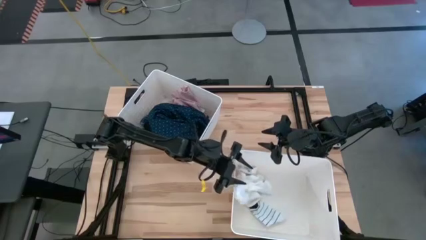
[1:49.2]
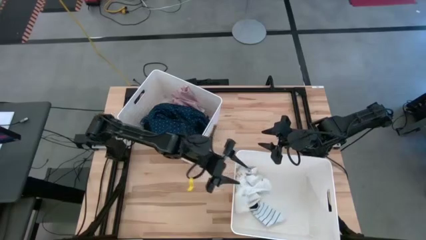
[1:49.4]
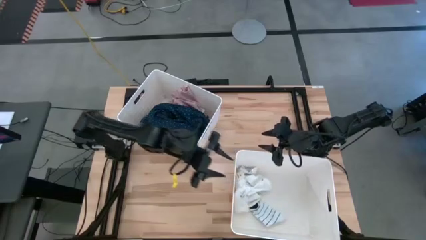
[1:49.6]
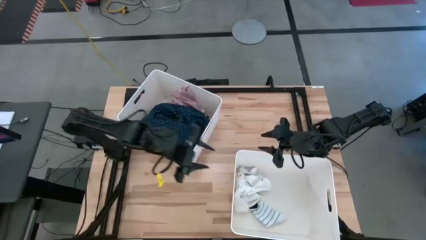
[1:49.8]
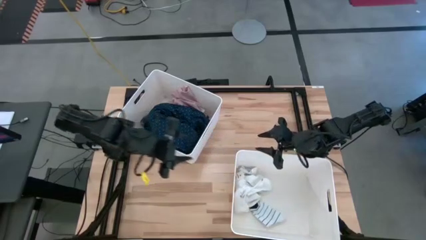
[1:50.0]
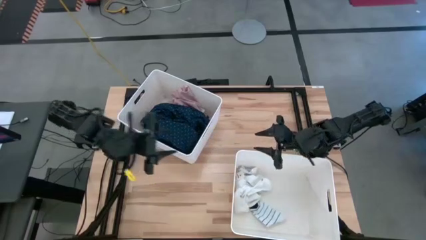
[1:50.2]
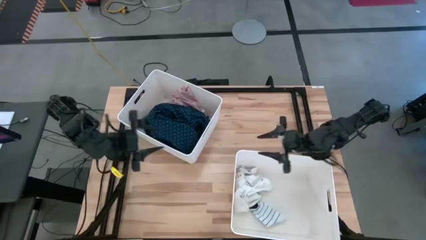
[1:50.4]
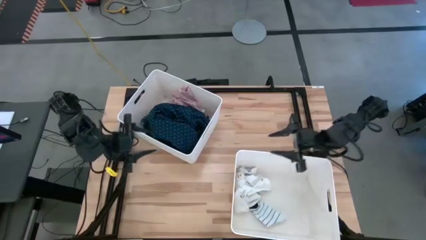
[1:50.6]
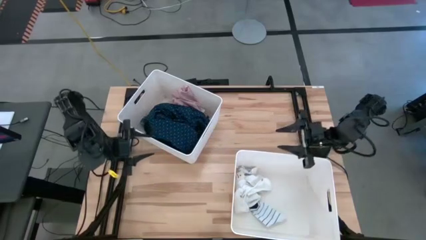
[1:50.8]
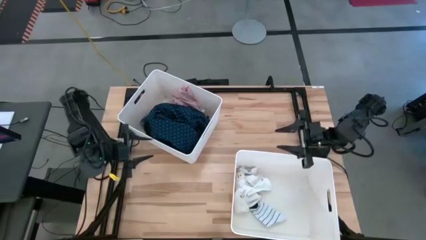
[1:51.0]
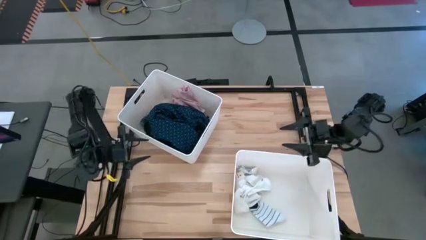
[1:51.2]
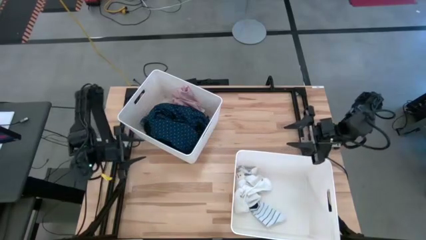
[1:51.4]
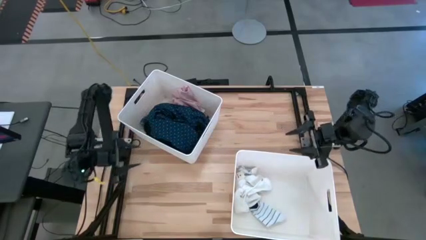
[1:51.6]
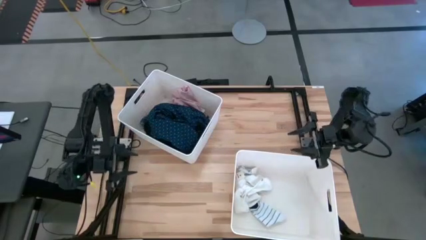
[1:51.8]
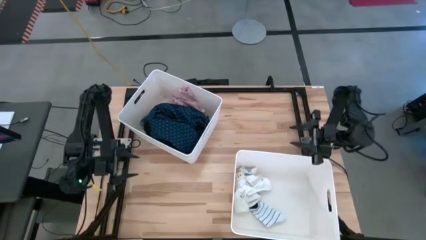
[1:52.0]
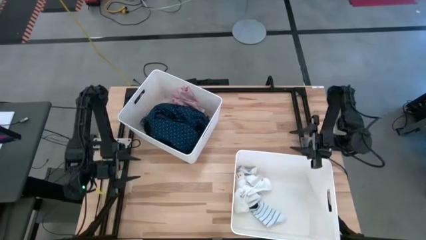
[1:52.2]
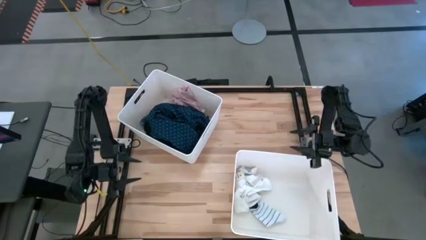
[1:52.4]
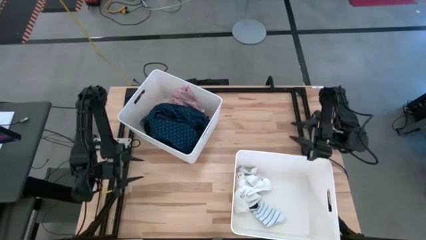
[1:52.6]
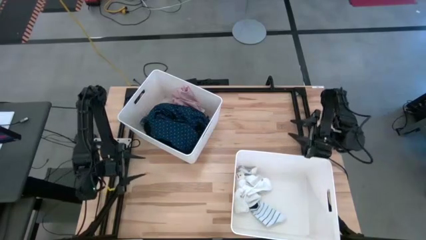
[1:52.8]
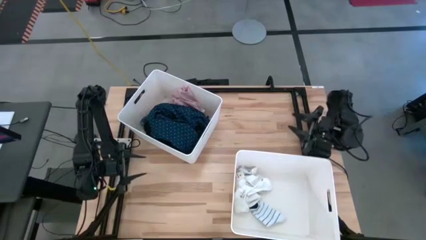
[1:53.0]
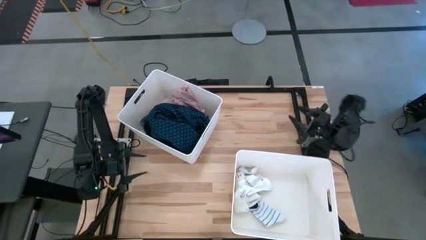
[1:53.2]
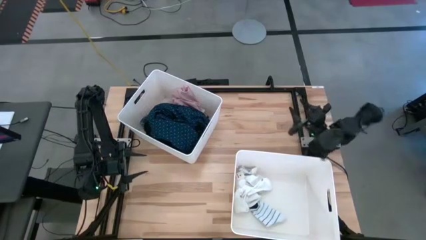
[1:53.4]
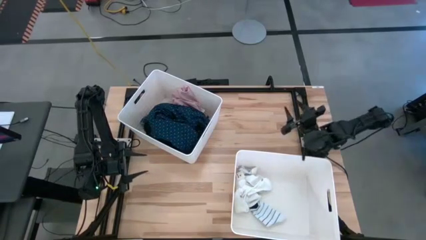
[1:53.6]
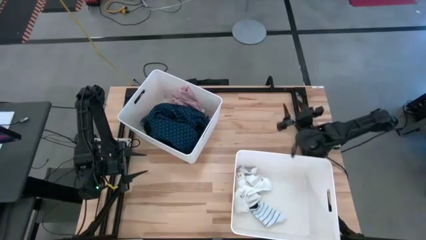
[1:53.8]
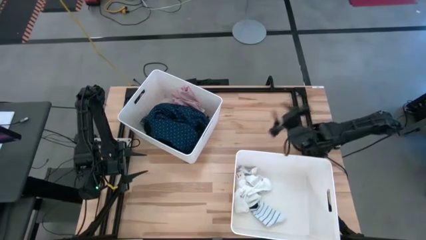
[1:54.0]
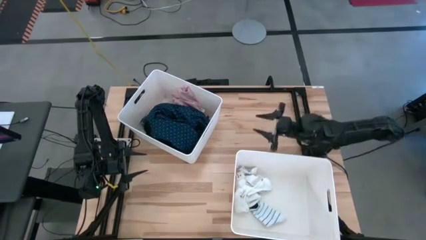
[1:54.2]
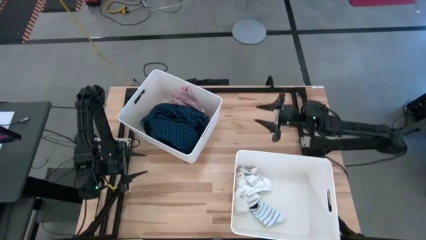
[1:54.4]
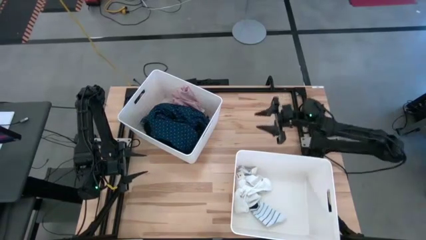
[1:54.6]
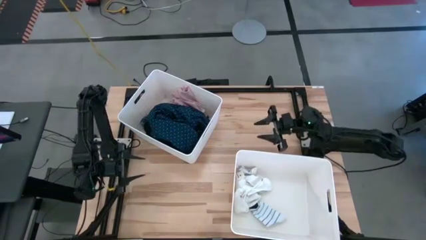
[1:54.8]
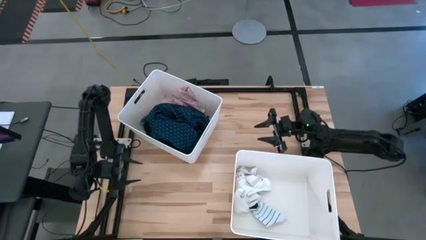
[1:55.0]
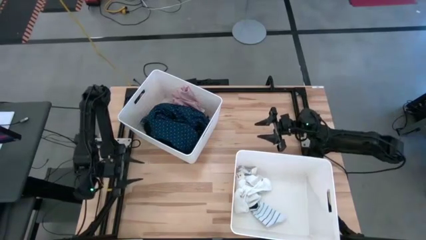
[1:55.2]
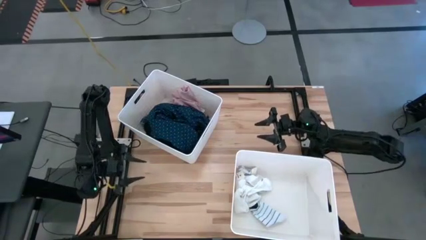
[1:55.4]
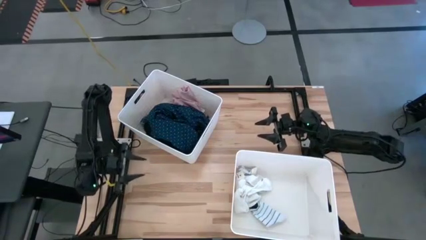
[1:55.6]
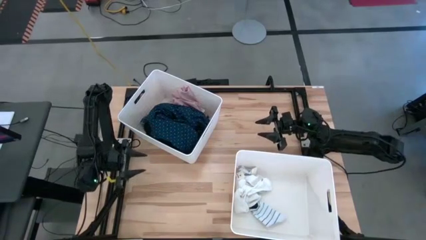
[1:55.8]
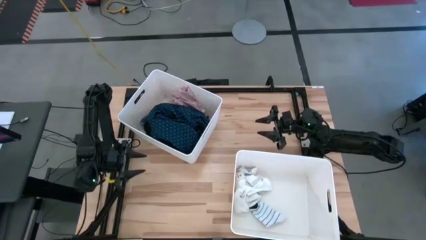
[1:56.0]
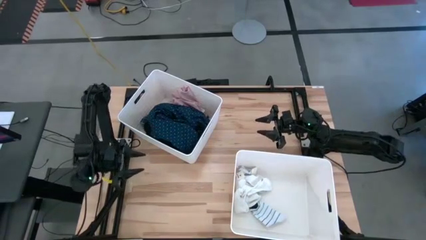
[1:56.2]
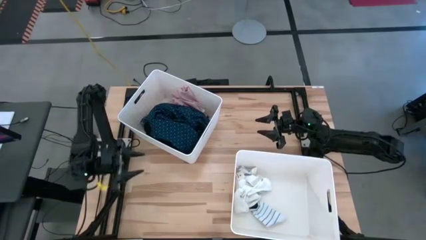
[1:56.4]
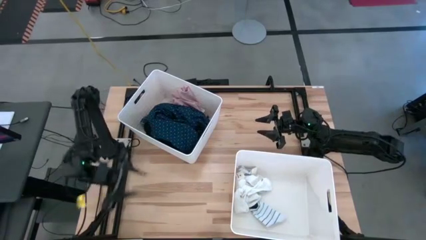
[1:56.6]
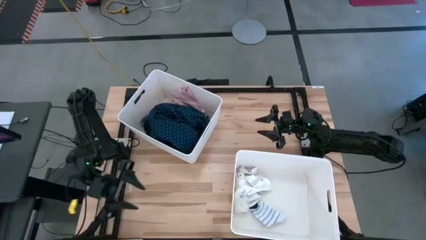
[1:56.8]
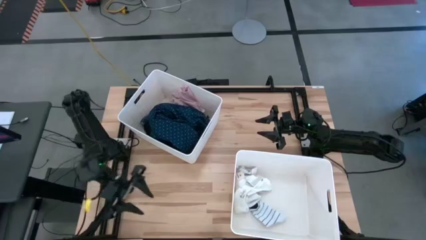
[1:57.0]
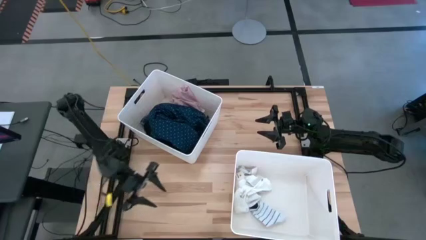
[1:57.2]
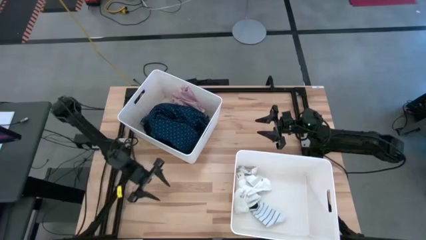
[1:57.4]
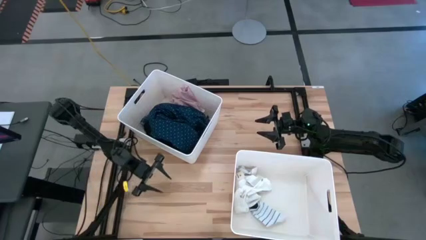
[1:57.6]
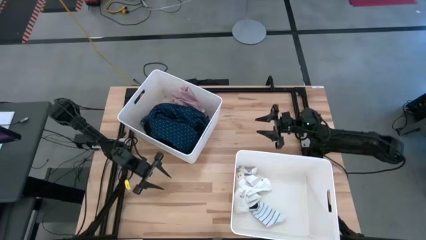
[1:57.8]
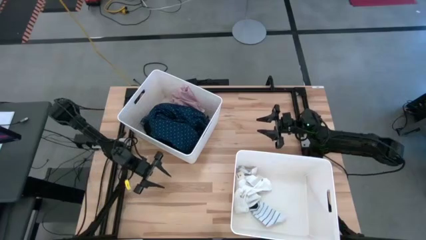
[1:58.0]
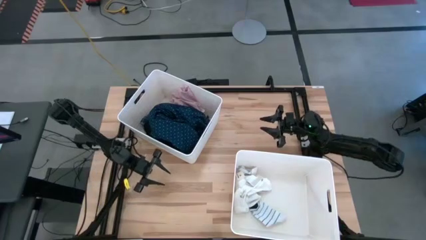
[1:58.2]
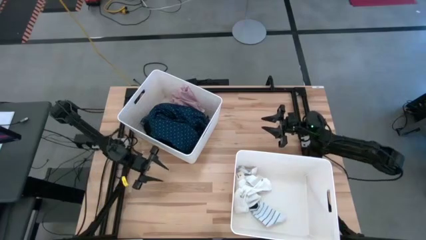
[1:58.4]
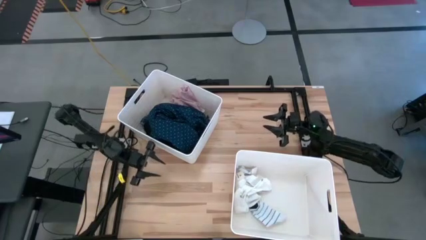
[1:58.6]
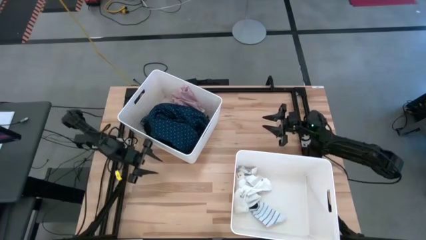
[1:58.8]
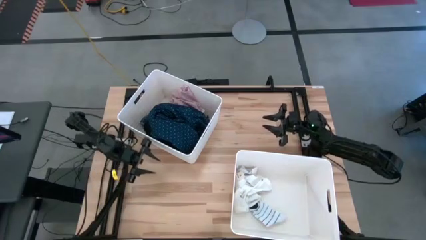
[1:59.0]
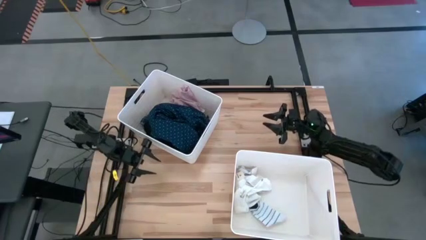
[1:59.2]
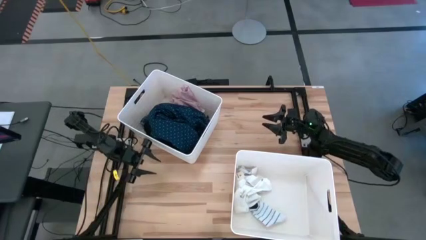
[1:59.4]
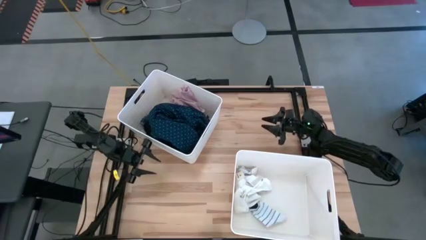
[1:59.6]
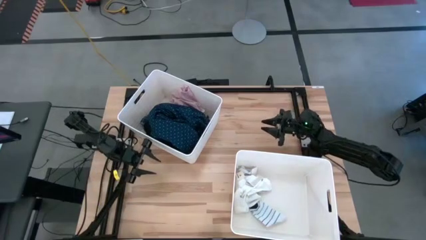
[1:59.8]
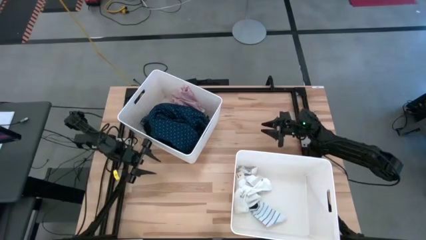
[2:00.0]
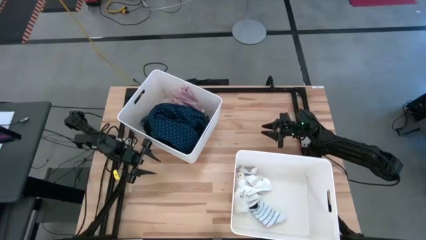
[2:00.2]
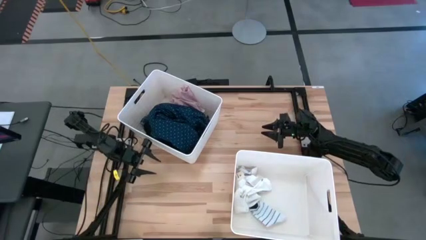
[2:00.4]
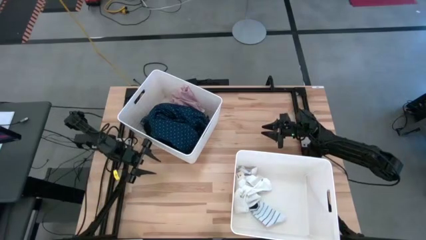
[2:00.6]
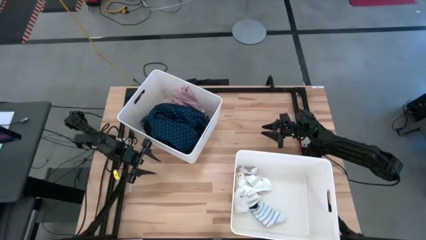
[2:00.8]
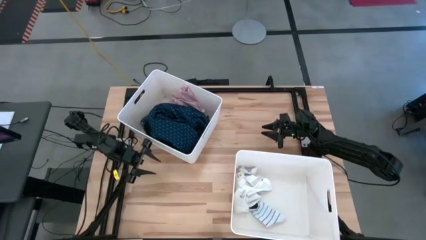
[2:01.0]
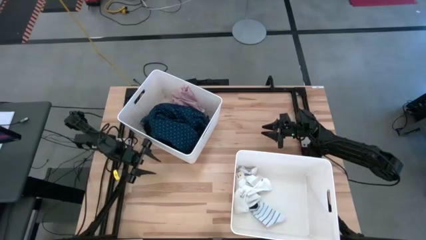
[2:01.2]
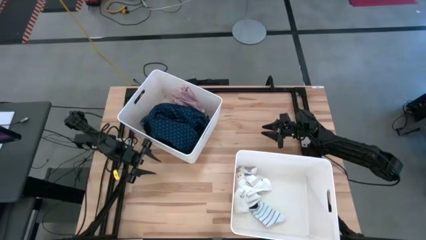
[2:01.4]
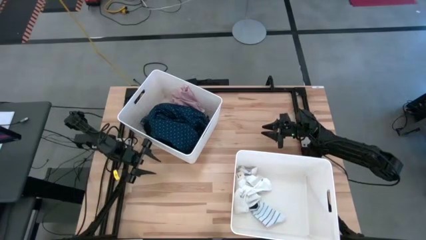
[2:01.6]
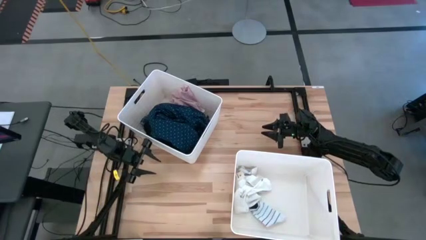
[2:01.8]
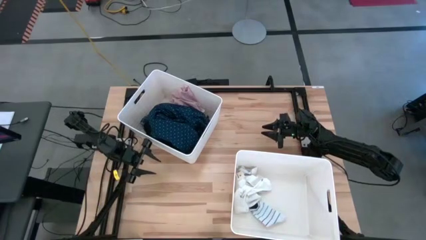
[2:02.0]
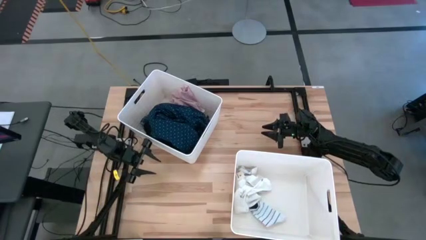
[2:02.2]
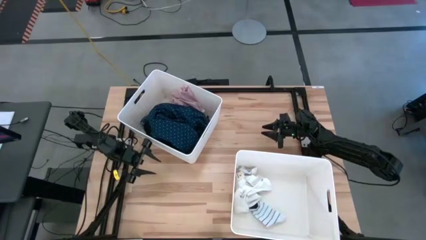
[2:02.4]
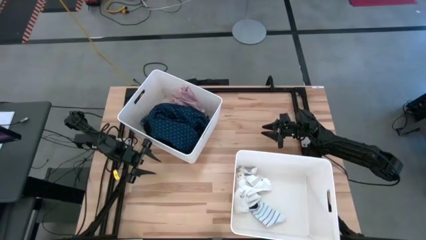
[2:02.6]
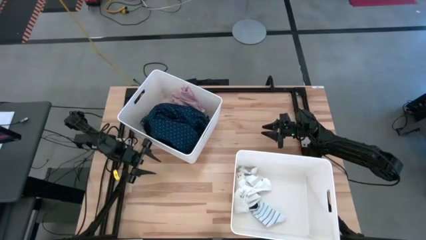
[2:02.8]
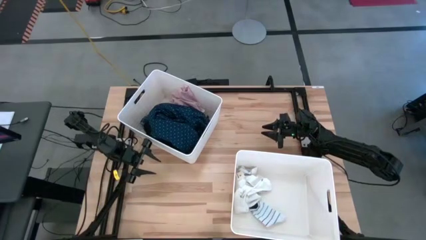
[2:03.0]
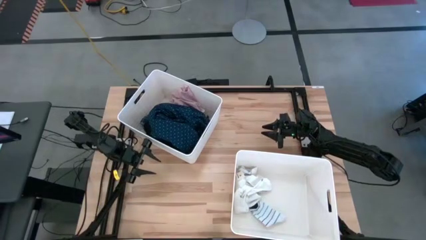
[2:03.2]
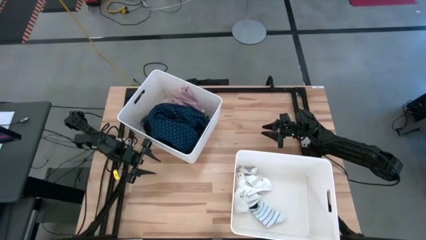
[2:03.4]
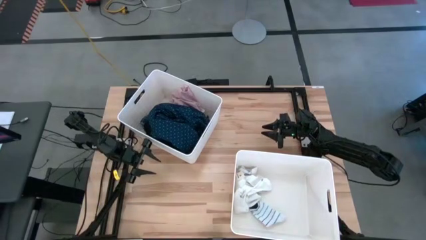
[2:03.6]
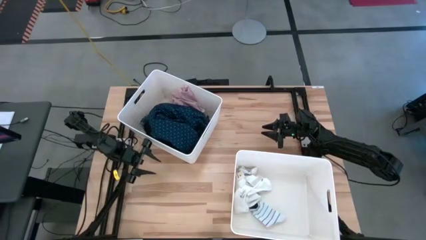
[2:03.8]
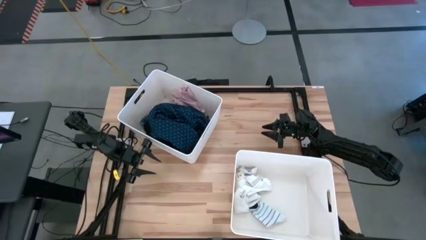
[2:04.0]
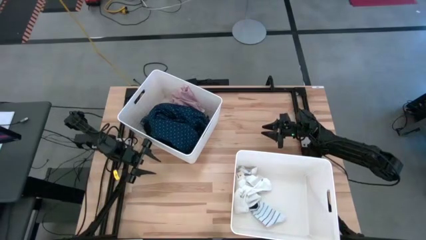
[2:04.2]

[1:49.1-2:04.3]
Task: Sort clothes
Return to Home Position

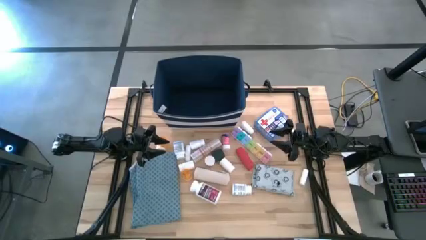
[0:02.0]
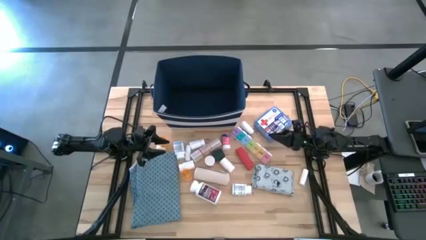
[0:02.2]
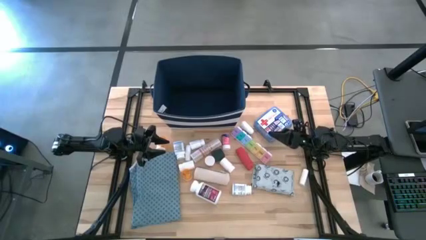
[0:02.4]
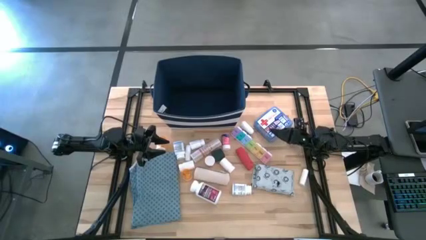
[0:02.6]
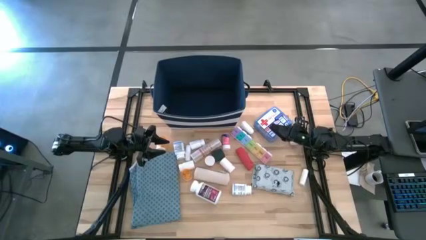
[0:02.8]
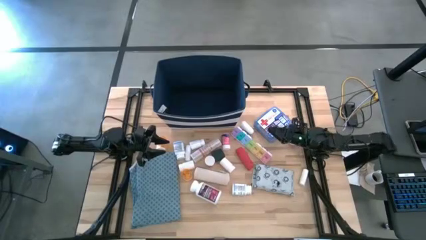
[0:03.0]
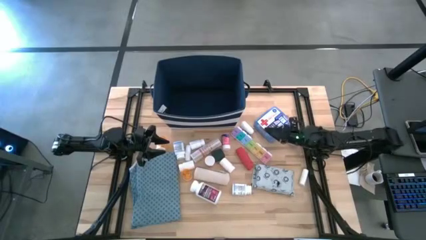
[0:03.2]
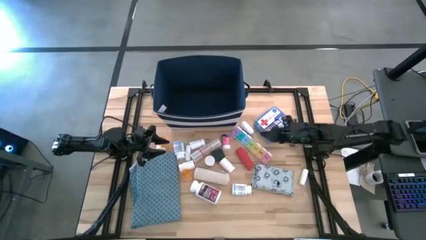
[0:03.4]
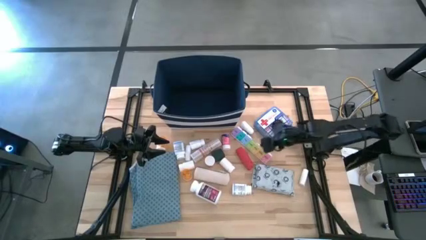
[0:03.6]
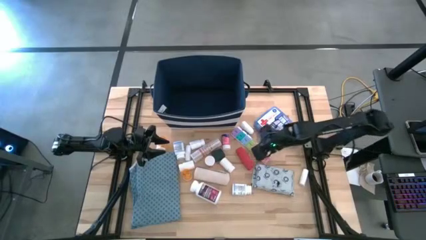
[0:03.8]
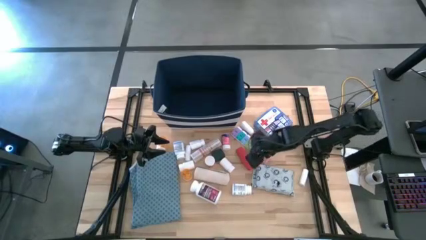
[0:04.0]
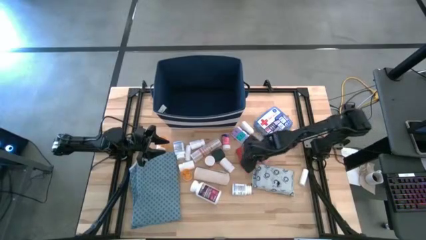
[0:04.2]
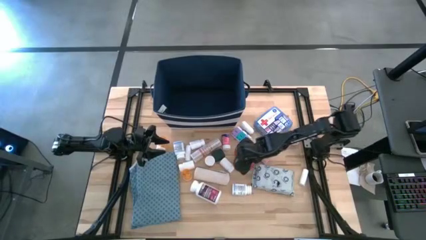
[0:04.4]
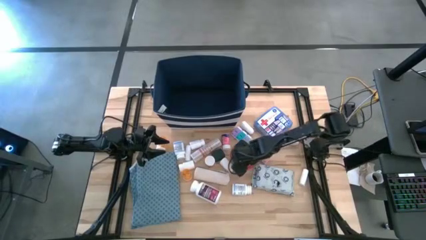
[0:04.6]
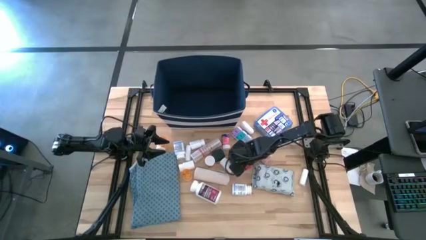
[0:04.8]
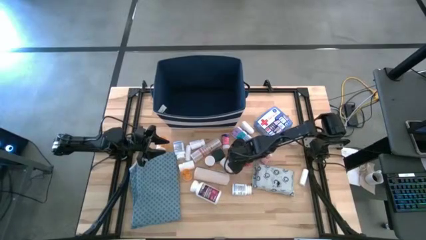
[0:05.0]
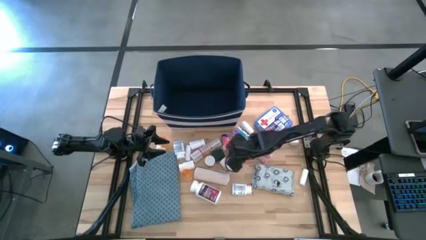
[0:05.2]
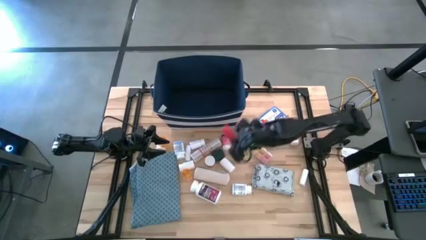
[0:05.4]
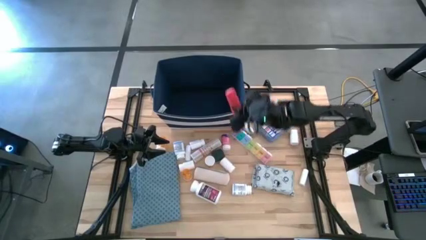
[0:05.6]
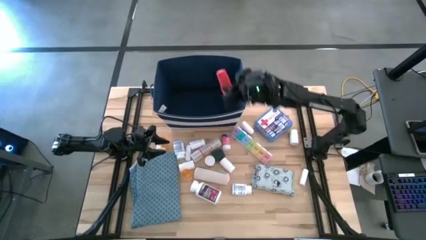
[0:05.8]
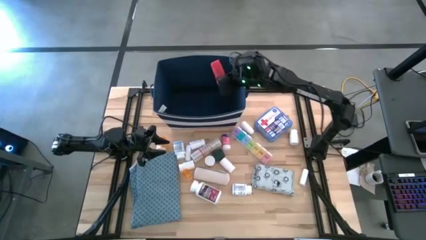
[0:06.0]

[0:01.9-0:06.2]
Task: Pick & place medical supplies in basket/bin
Put the red bandage into the blue bin
